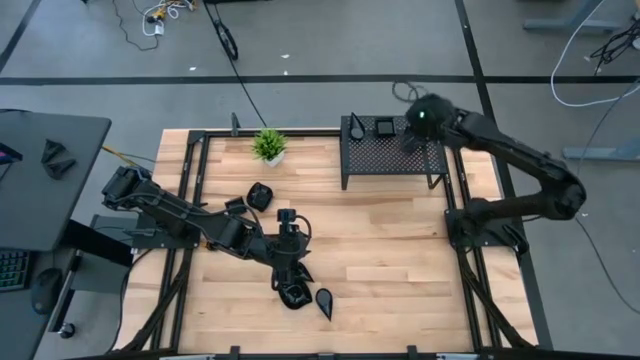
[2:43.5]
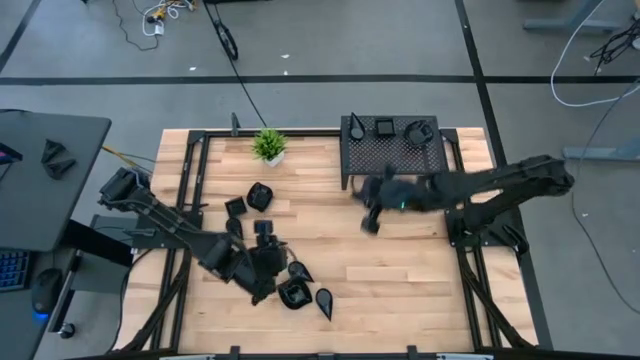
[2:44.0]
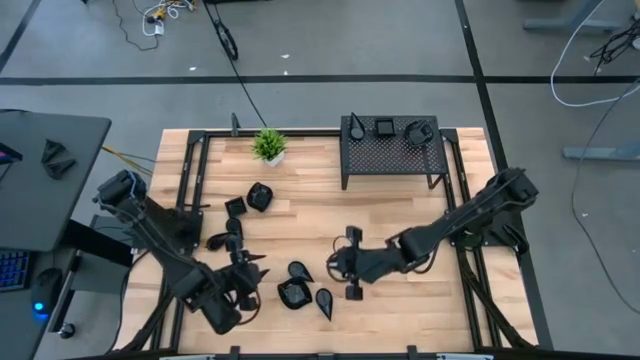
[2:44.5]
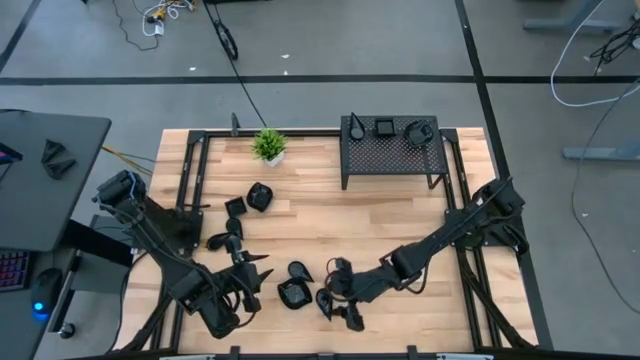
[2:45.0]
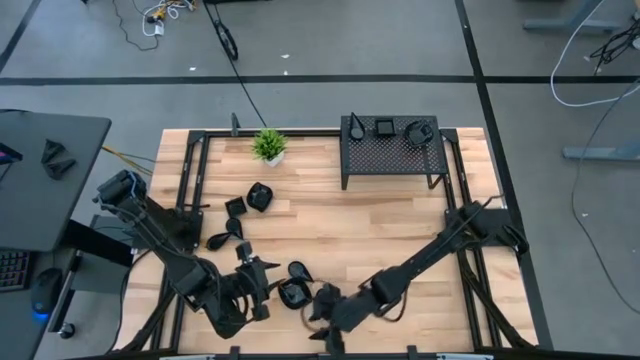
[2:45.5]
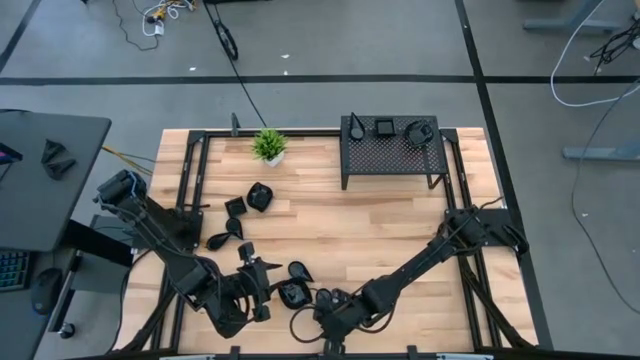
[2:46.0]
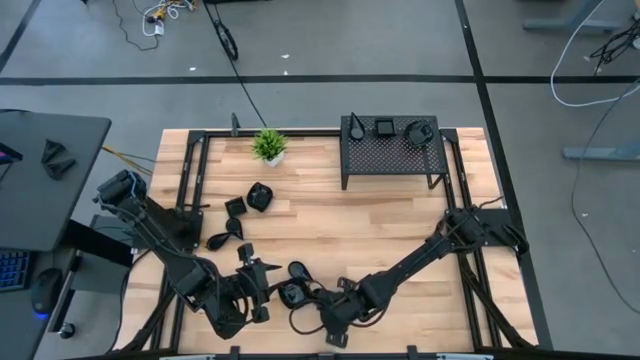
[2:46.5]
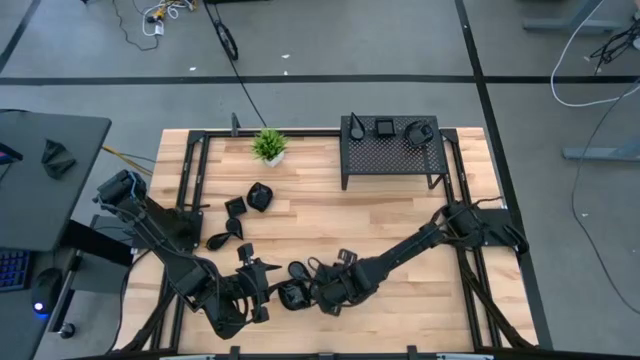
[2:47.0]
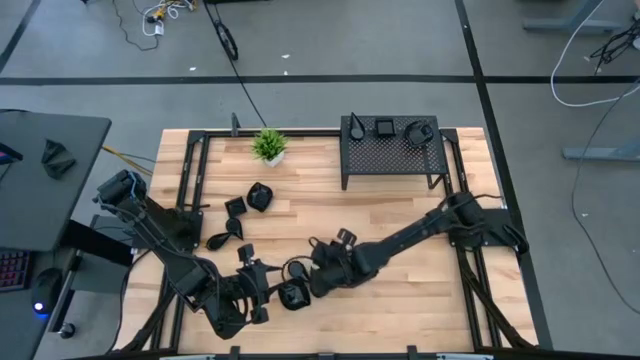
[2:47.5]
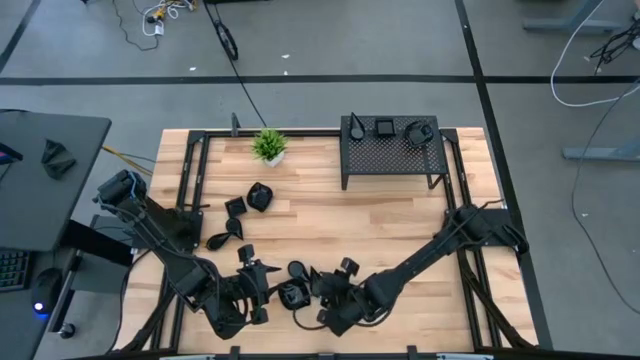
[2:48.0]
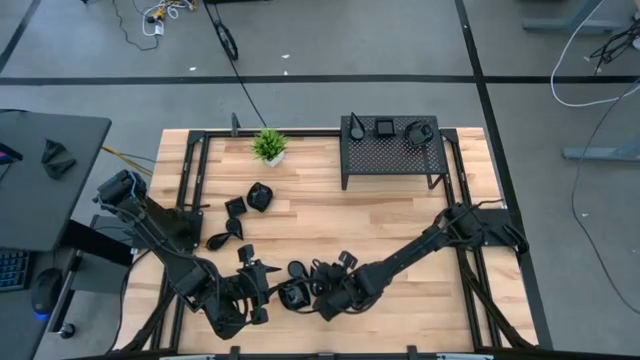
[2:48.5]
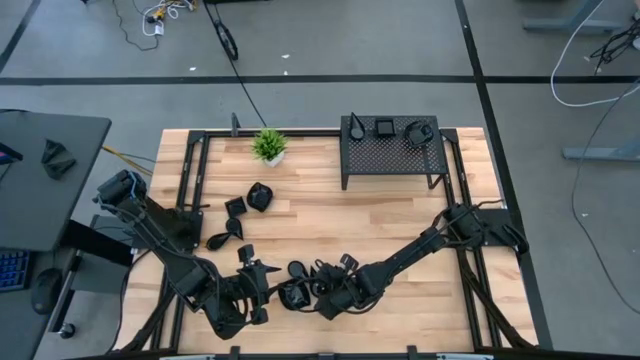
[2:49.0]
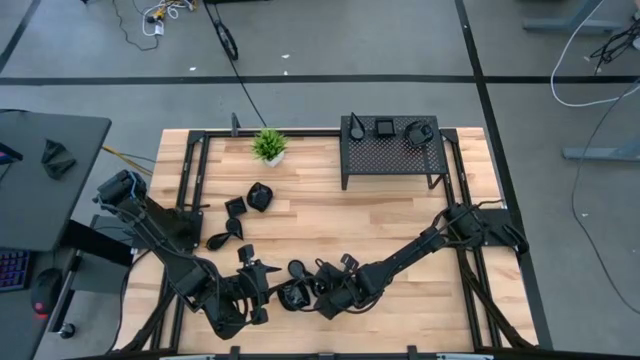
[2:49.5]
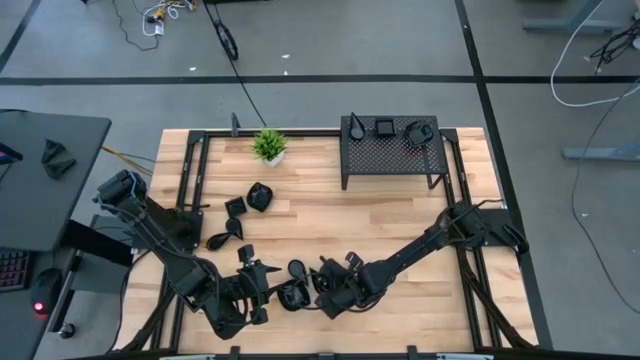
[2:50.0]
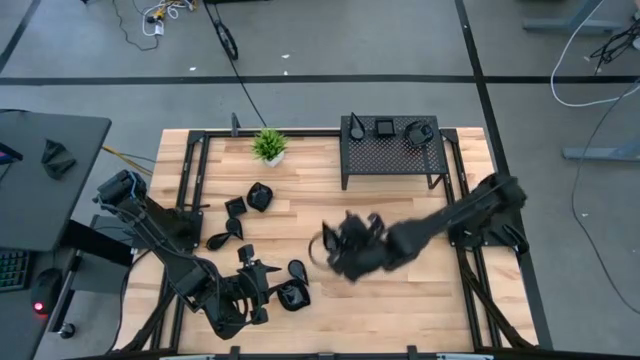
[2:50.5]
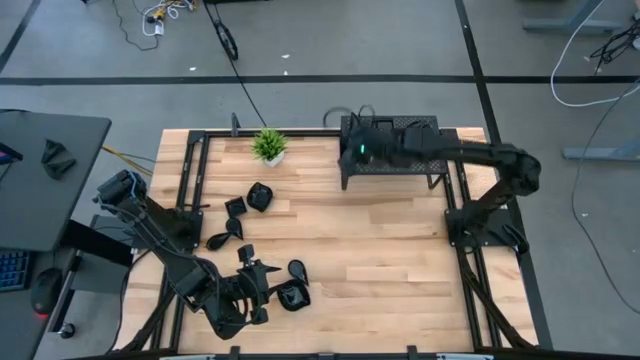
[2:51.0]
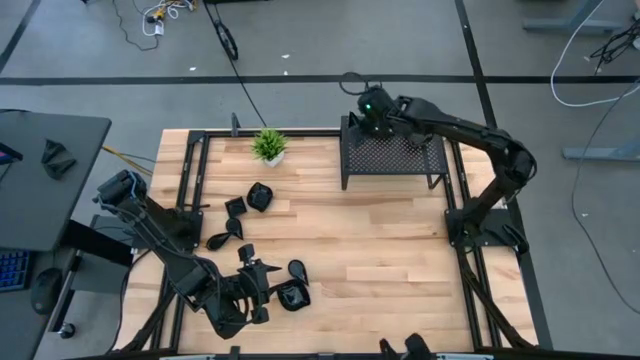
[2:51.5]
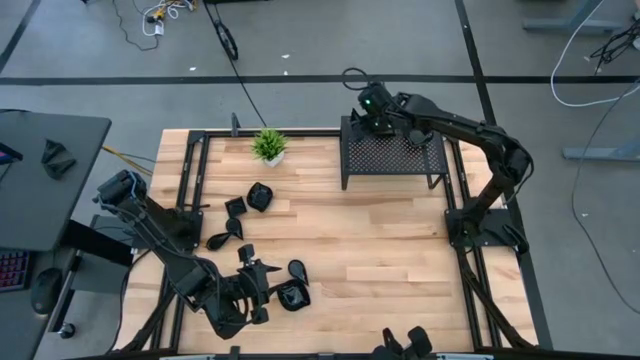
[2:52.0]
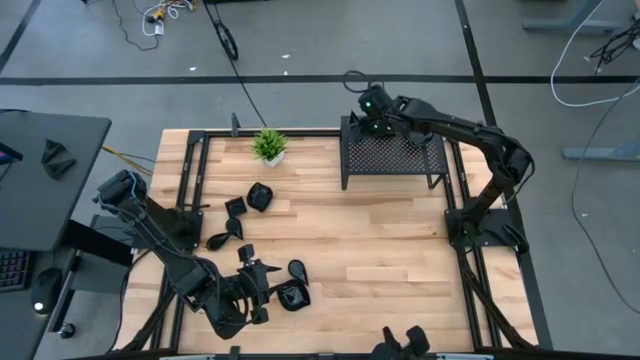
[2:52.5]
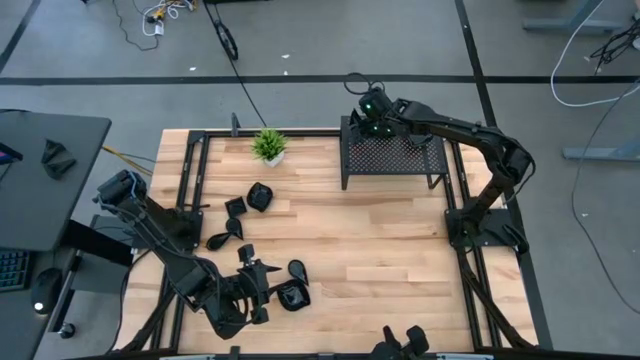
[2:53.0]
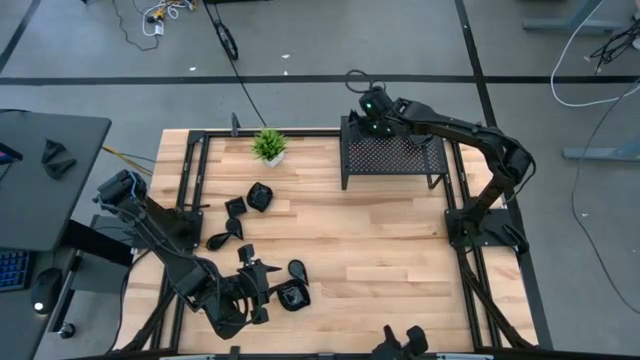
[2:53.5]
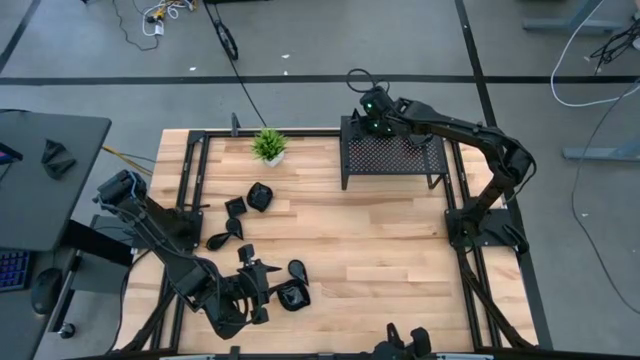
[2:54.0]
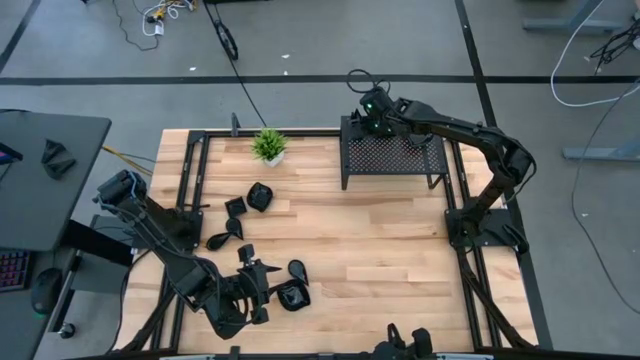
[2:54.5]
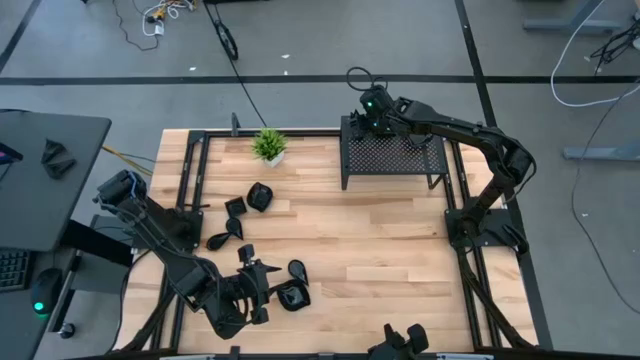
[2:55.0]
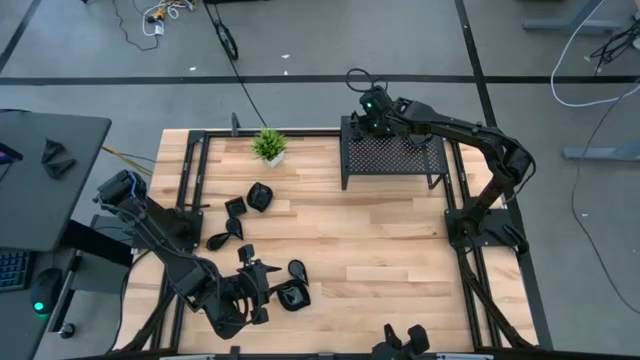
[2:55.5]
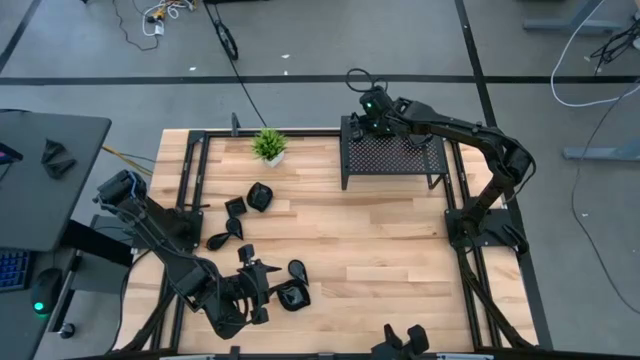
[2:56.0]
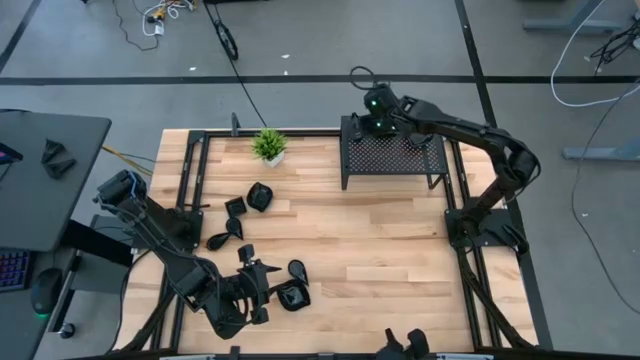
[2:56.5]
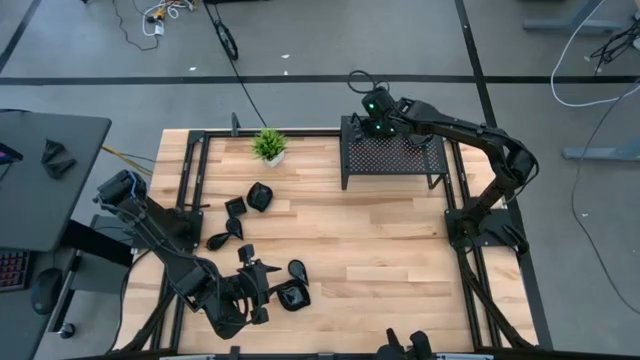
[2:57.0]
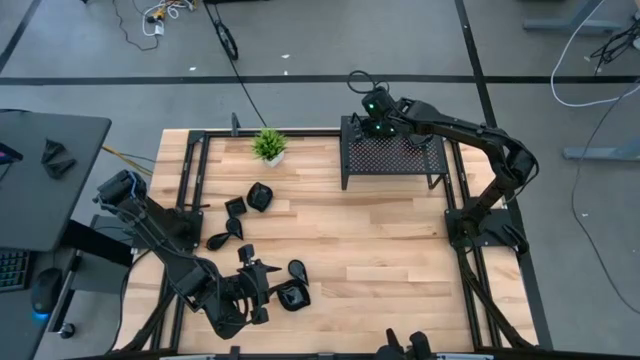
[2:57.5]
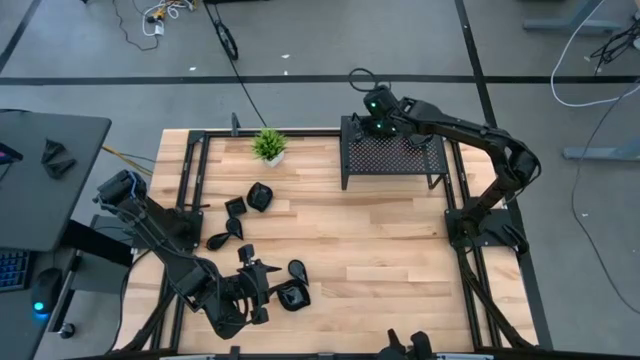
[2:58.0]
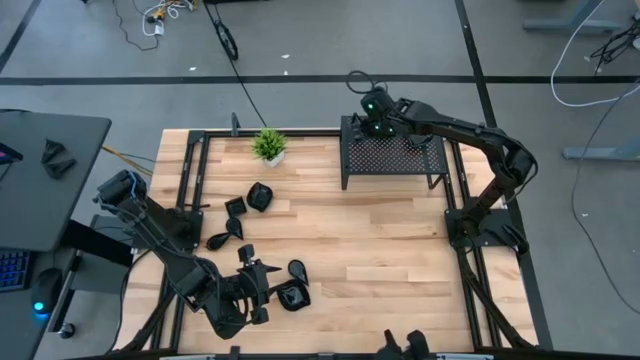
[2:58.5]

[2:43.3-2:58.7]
Task: Pick & Place Mini shaped plates
Stack the black drop-shaped plate on top of the black drop-shaped plate on the shelf

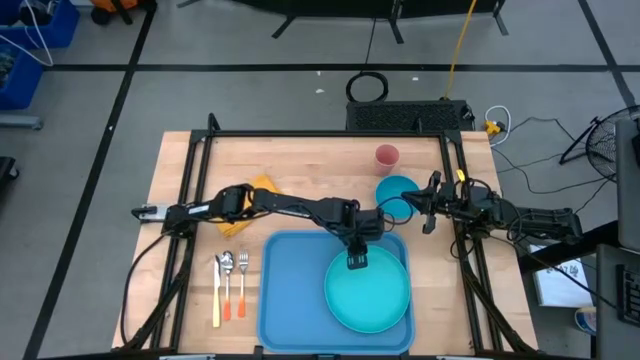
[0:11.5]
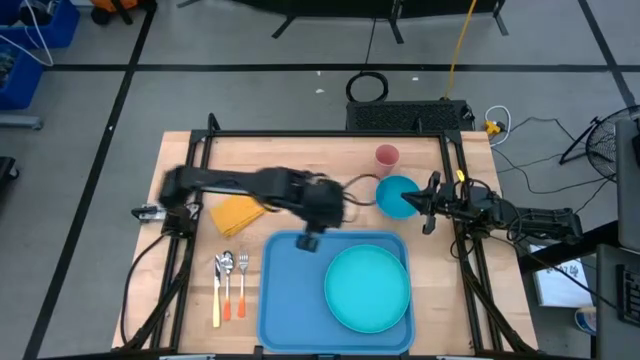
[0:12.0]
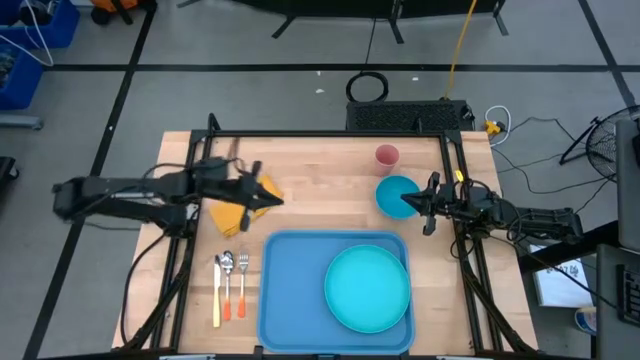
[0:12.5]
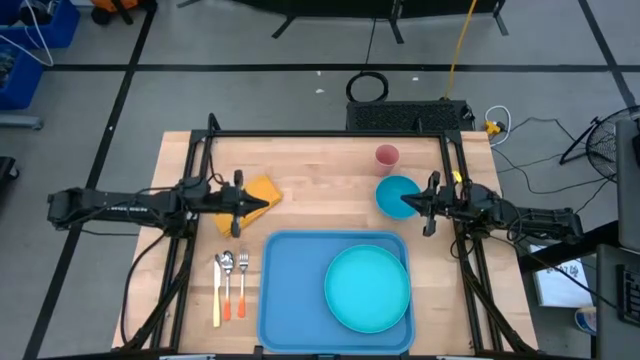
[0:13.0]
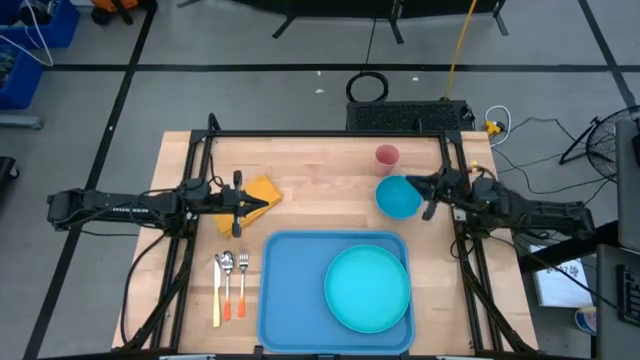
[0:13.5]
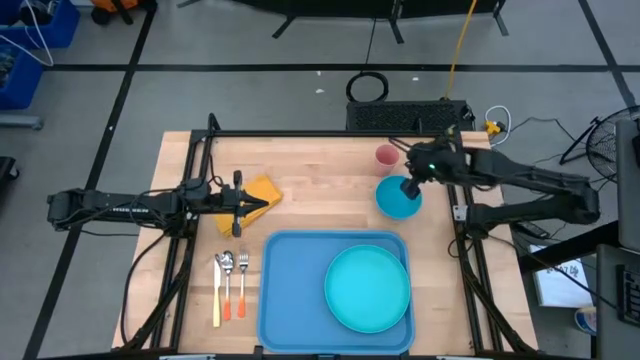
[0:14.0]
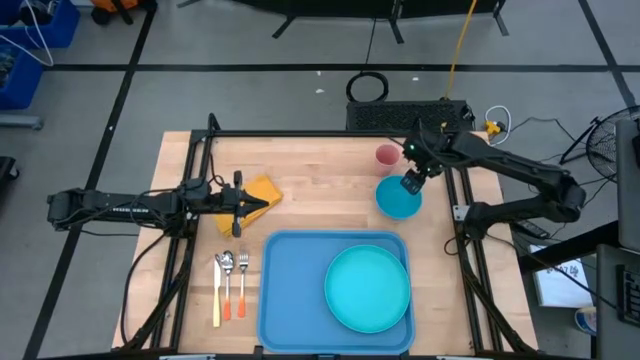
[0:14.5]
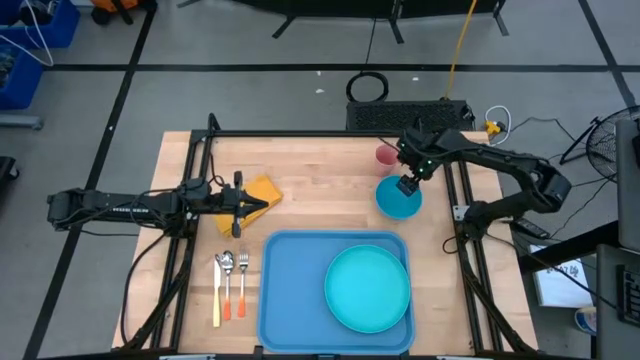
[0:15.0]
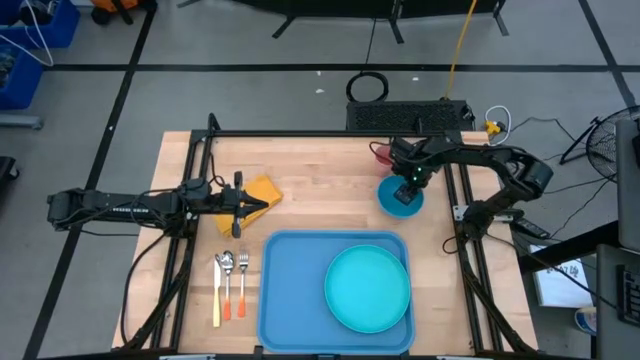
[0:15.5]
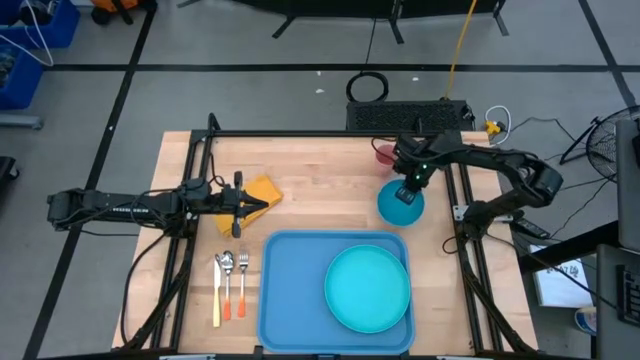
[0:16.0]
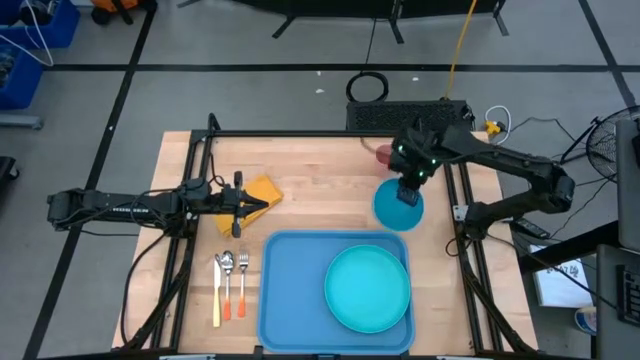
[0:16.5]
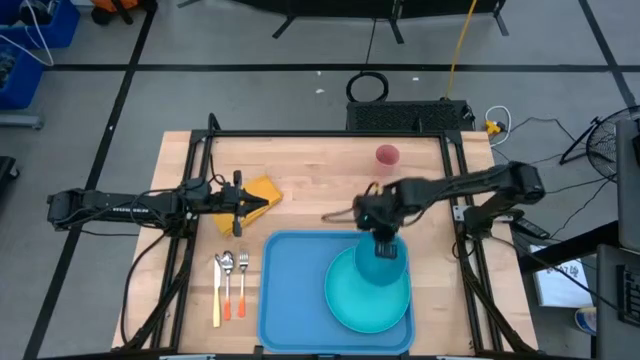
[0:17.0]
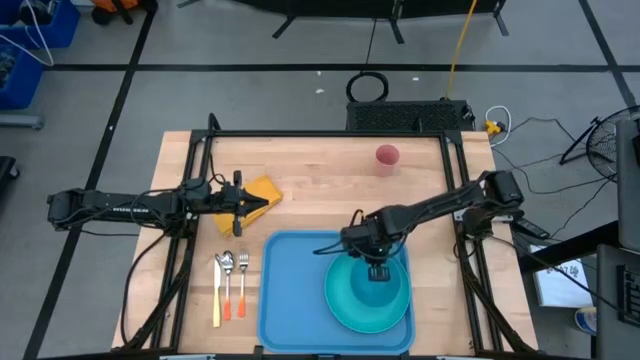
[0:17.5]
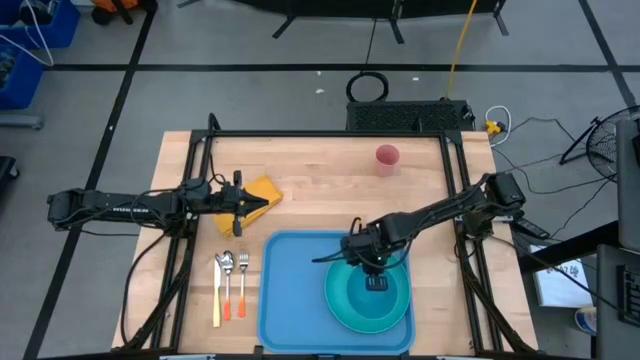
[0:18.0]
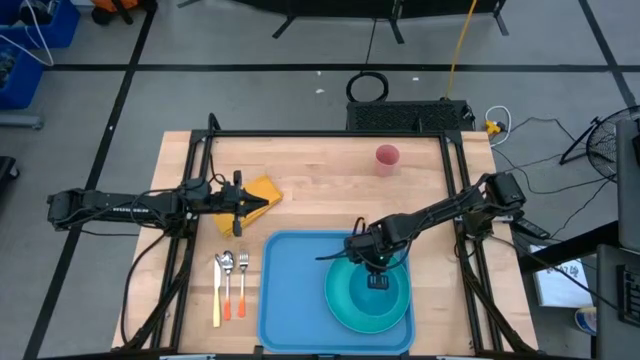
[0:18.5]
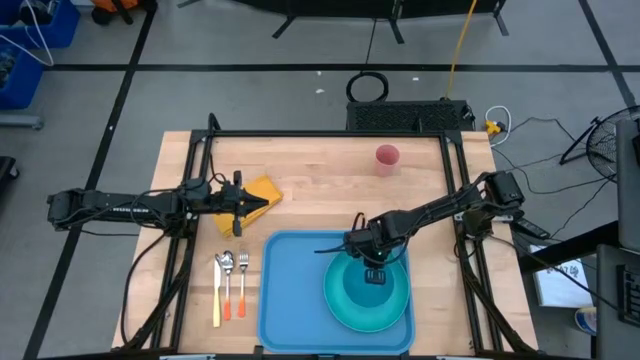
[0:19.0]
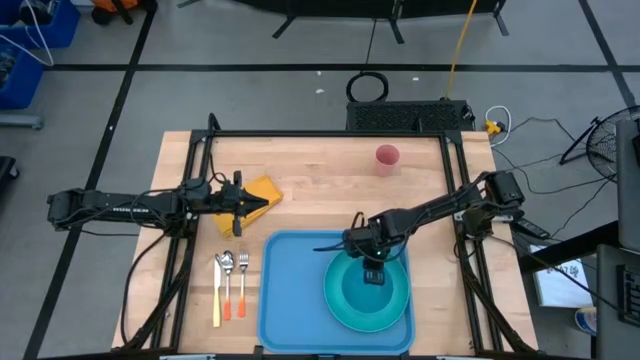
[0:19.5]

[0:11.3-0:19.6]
Task: Set up tray
Stack the blue bowl on top of the green plate on the blue tray
